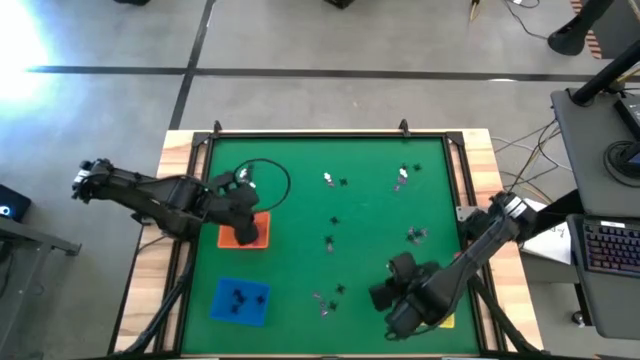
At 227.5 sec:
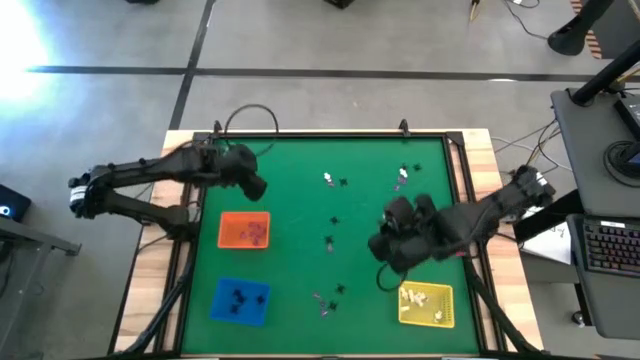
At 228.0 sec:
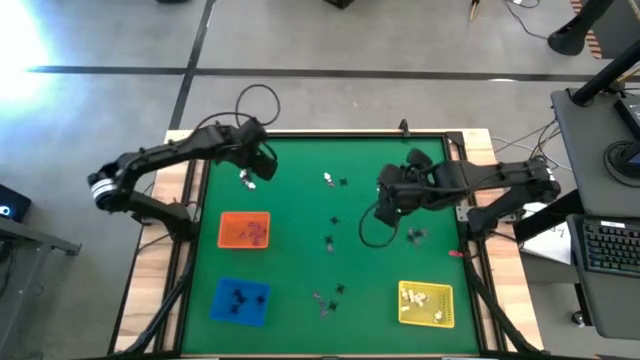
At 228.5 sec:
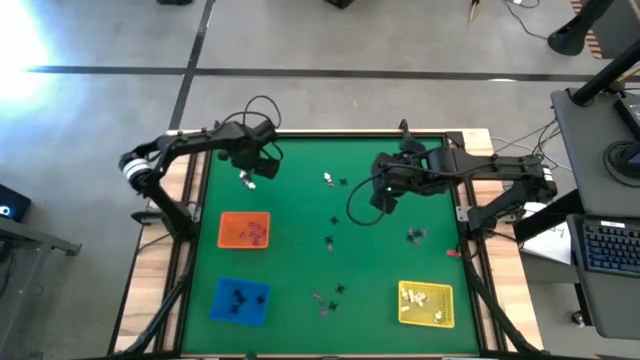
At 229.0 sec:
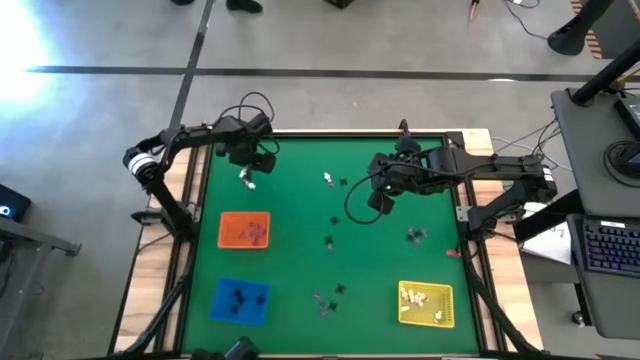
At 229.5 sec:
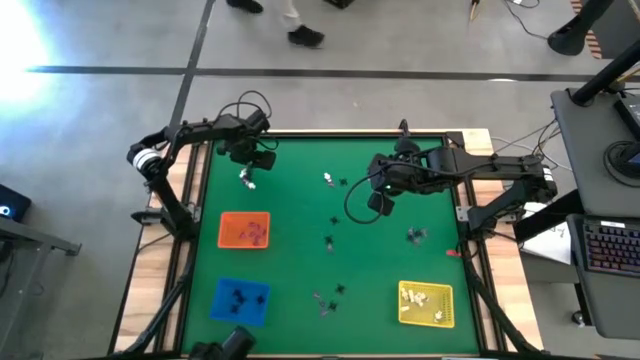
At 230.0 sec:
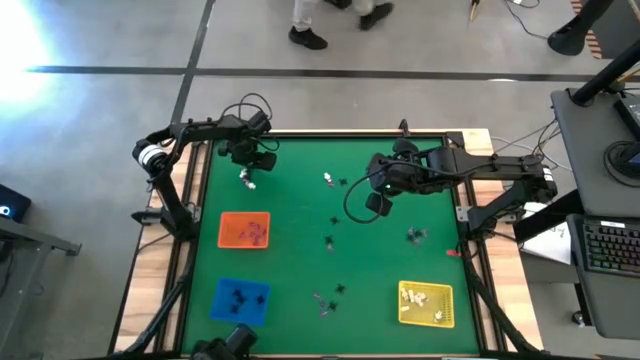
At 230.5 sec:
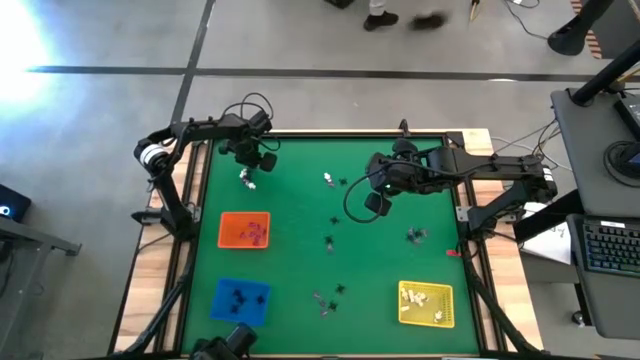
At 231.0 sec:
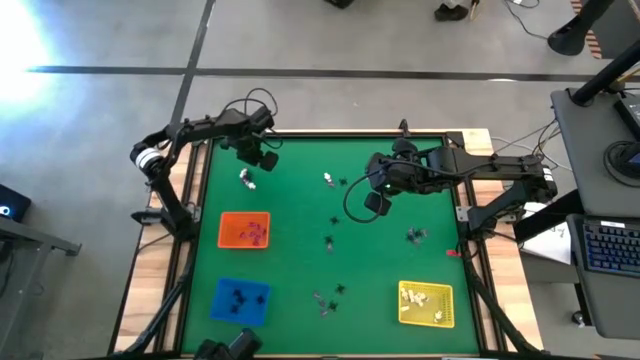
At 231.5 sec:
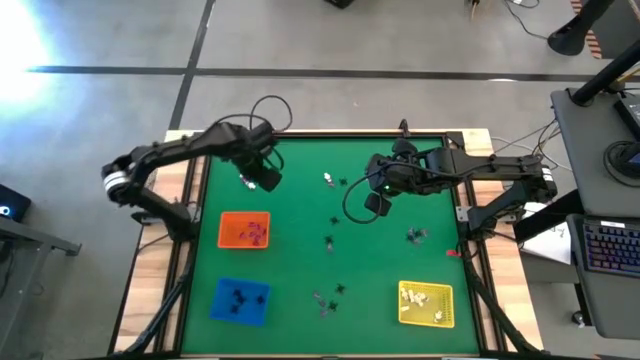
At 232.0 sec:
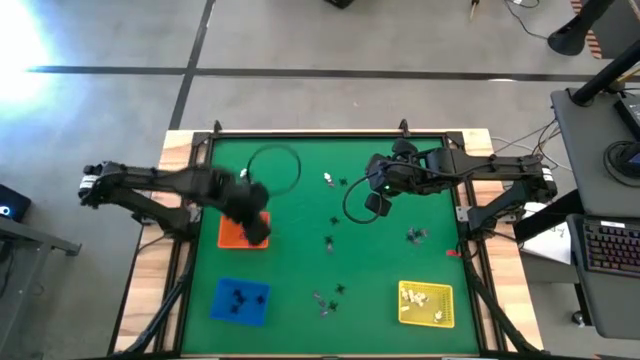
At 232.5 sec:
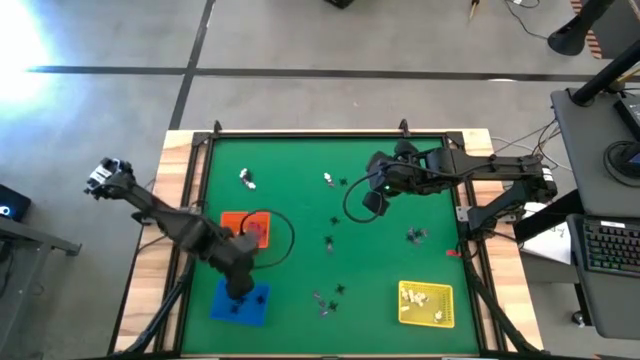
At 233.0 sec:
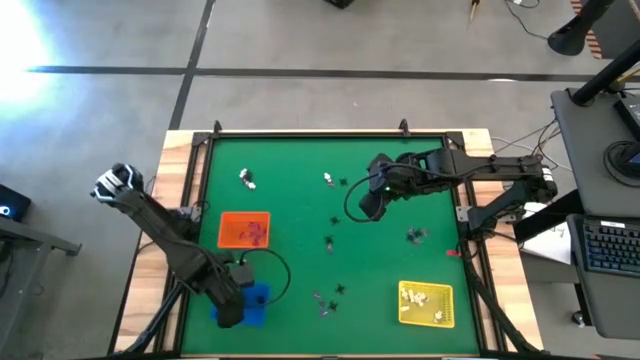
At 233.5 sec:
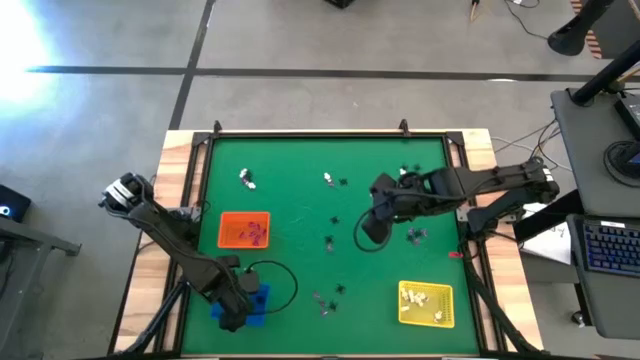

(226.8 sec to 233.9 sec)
Task: Sort Halloween decoration
Put the black spider toy into the blue bin

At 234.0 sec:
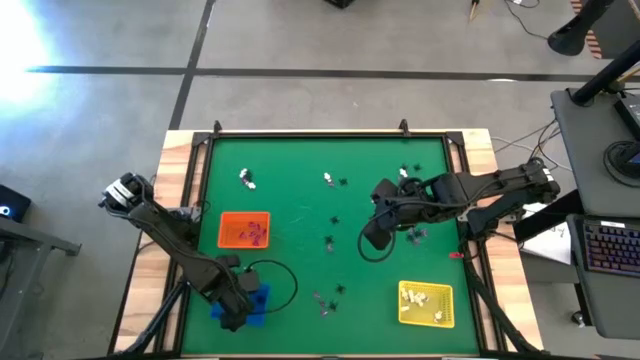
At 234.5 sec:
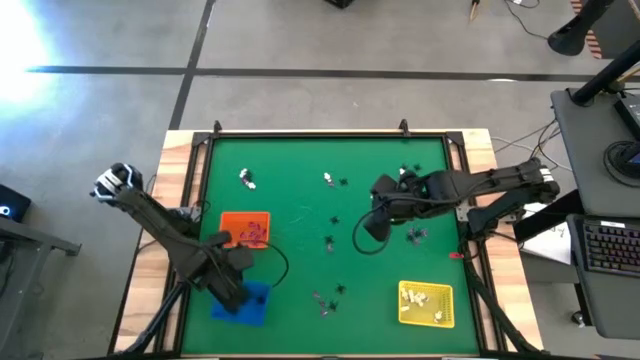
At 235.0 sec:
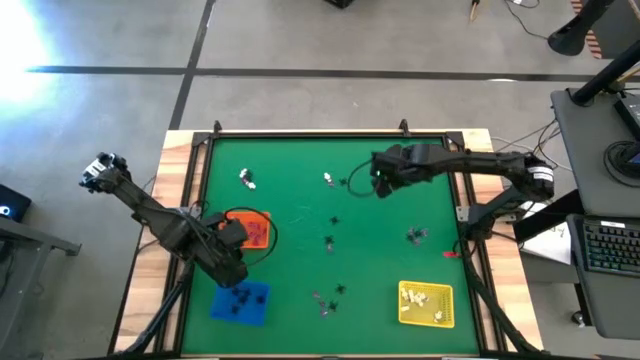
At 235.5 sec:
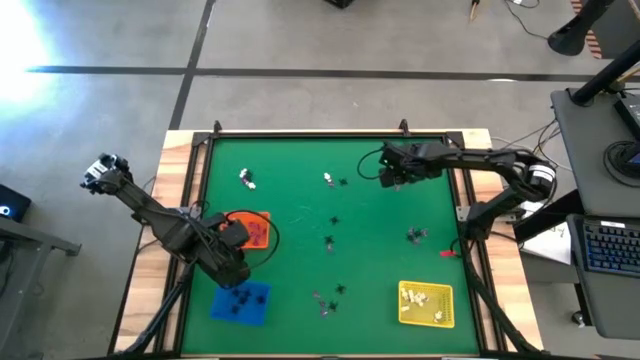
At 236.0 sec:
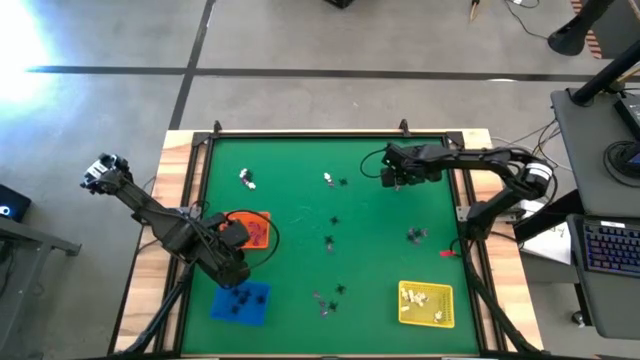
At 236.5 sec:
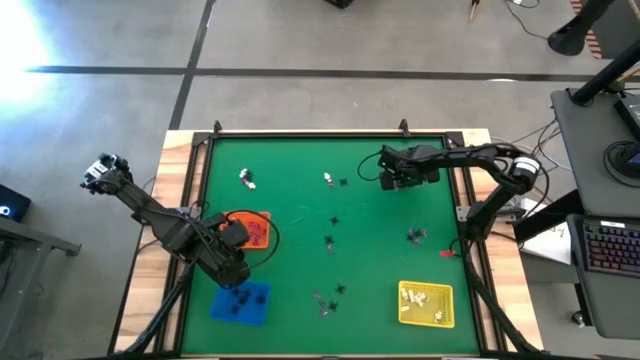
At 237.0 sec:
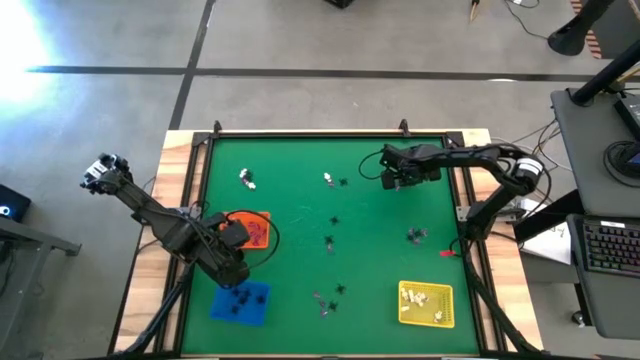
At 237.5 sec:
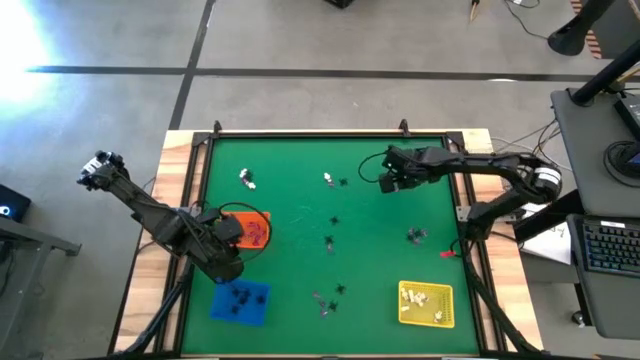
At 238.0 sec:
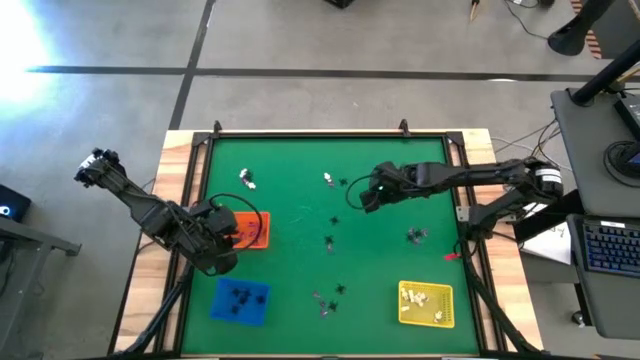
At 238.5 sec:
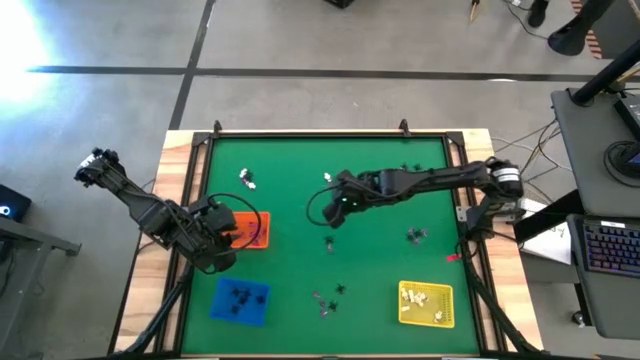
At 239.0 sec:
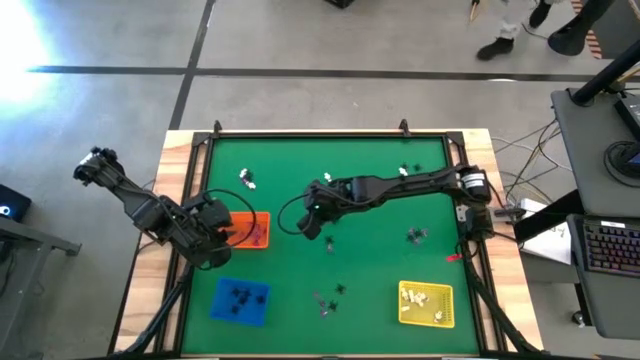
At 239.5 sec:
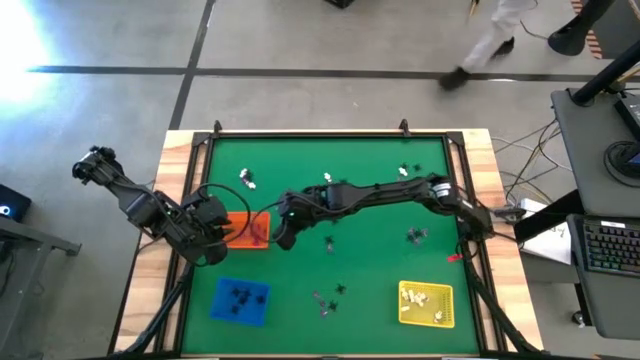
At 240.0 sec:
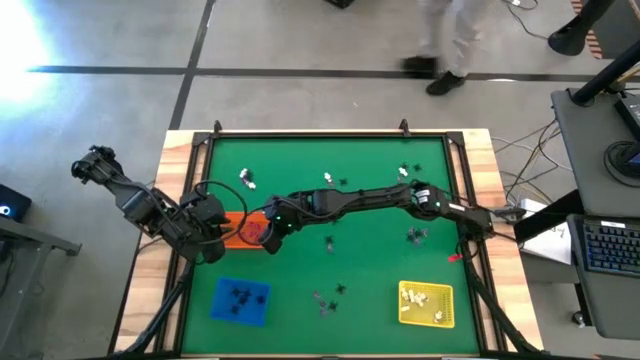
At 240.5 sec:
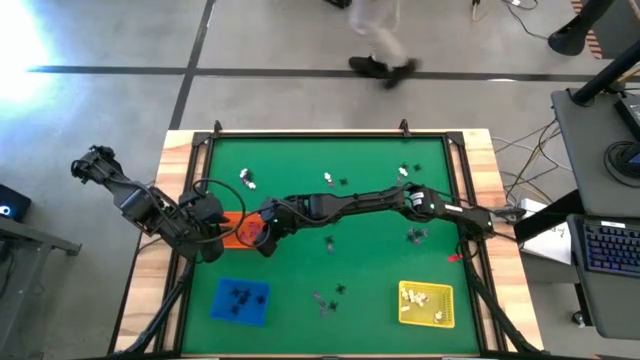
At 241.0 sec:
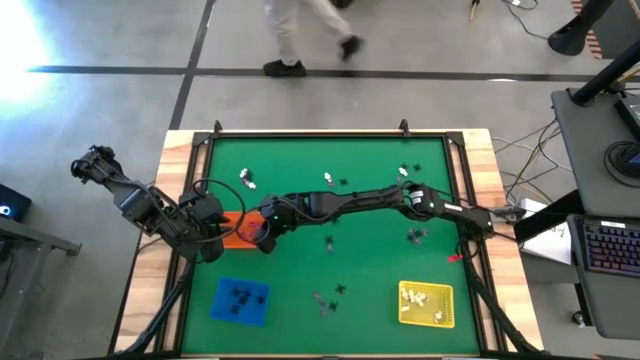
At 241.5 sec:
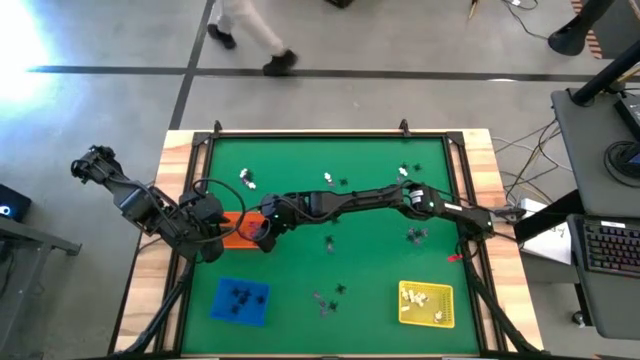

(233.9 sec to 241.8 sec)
Put the violet witch hat toy into the orange bin

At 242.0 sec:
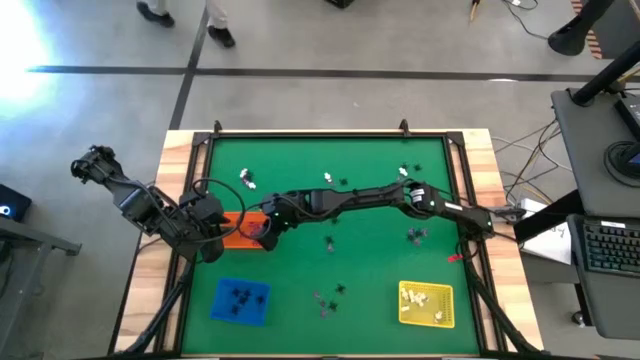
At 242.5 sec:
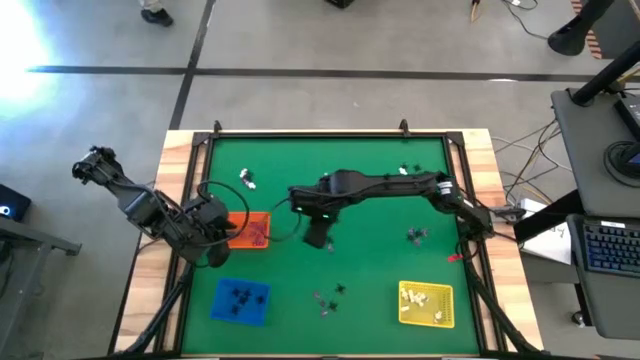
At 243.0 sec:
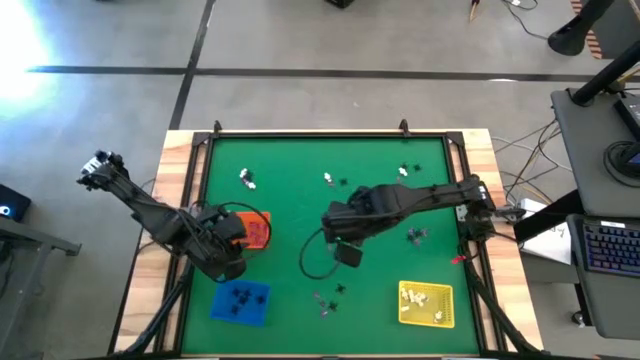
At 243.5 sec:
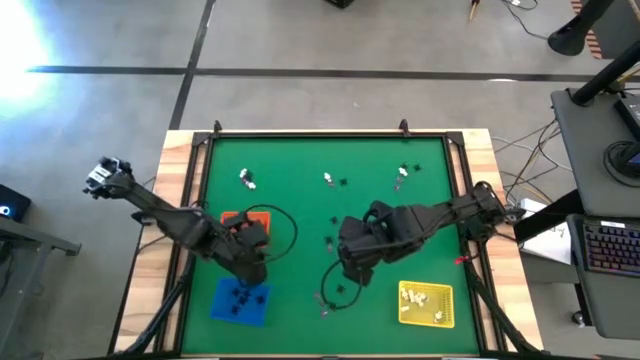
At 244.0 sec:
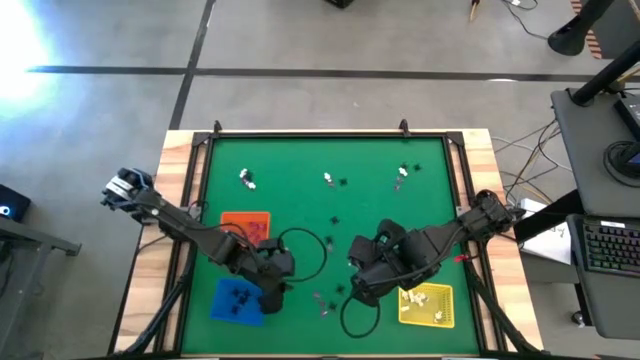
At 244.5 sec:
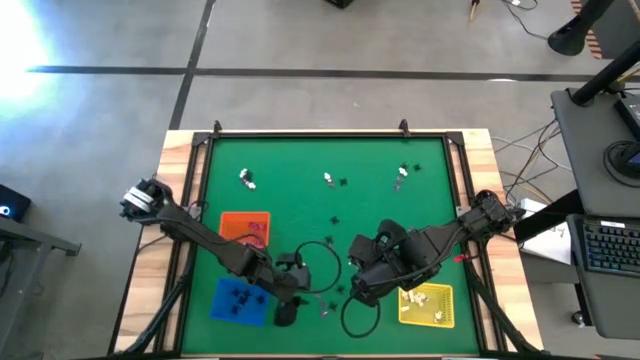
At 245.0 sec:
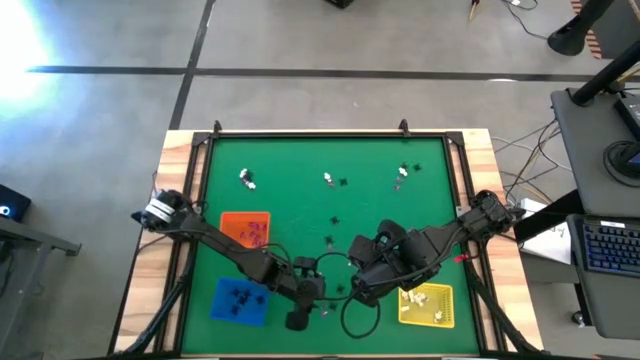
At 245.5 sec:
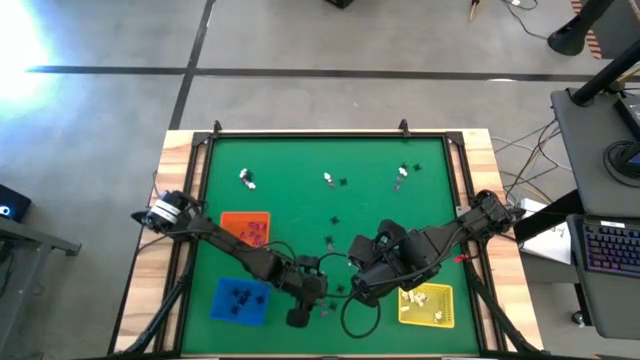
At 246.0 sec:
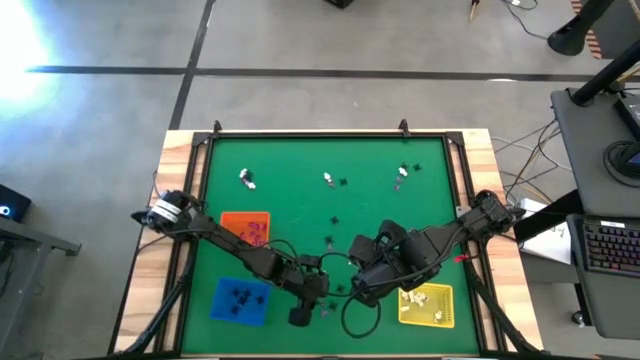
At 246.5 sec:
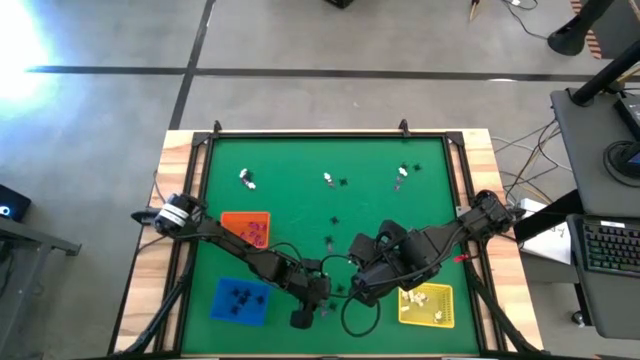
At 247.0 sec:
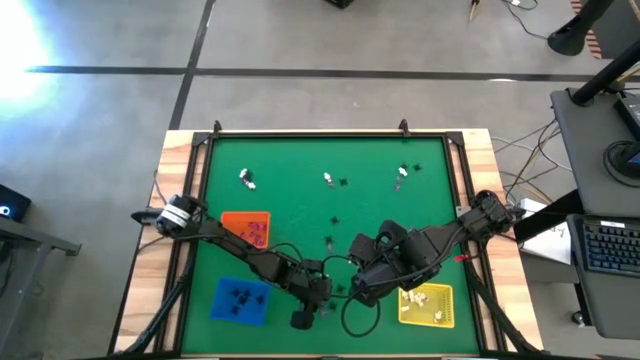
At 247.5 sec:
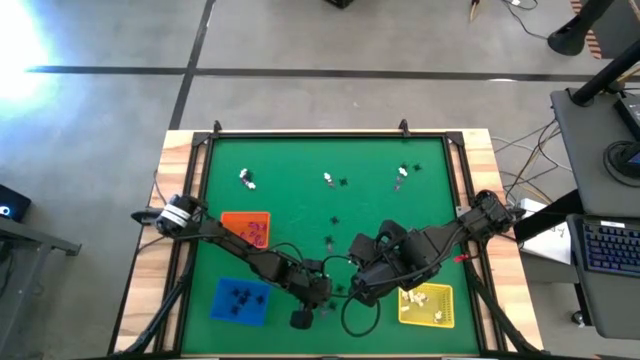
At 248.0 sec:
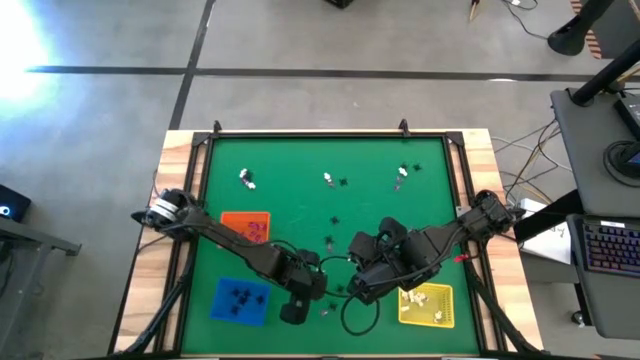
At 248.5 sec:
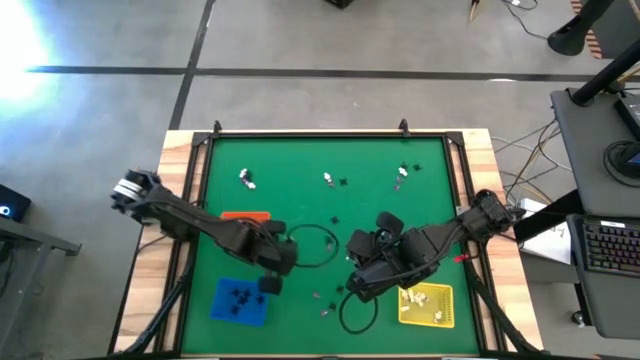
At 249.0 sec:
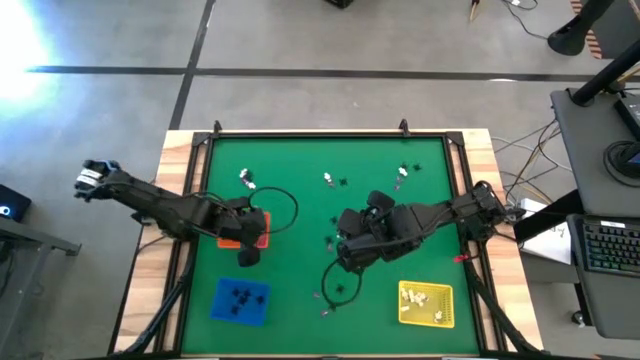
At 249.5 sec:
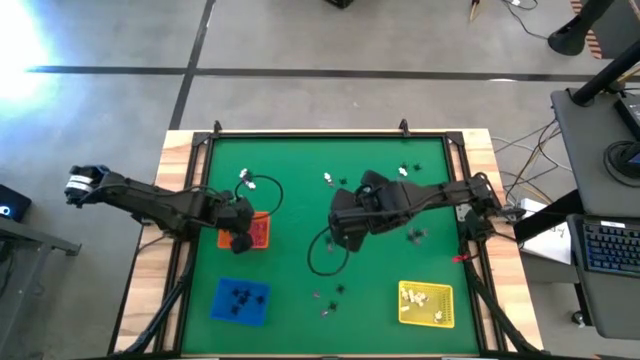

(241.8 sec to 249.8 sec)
Put the violet witch hat toy into the orange bin
